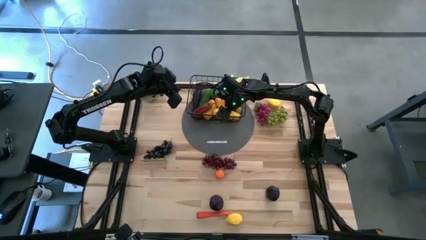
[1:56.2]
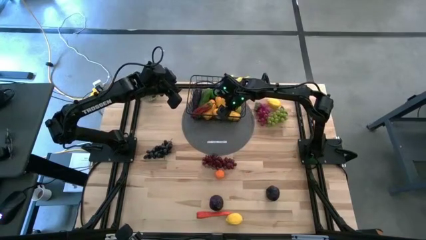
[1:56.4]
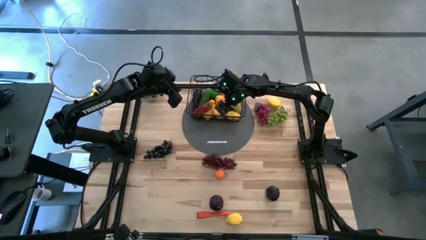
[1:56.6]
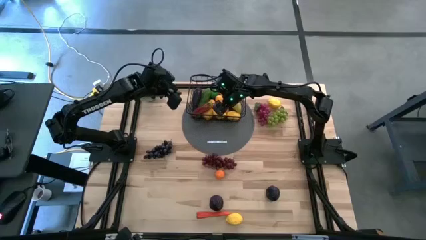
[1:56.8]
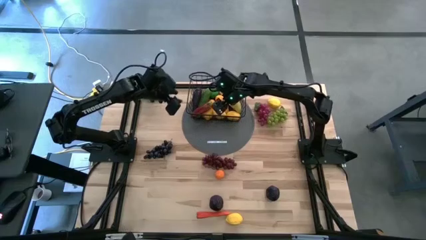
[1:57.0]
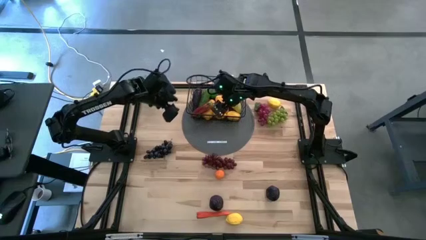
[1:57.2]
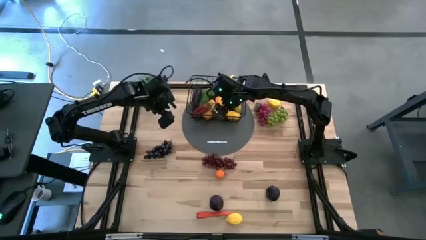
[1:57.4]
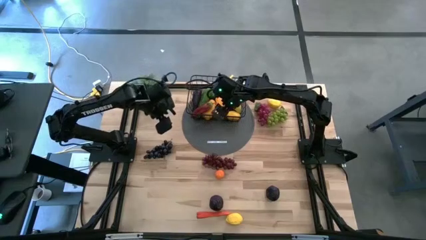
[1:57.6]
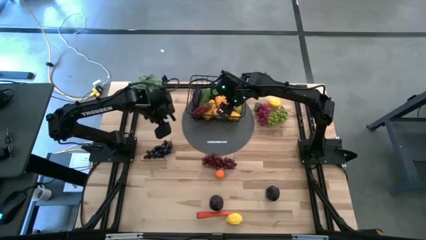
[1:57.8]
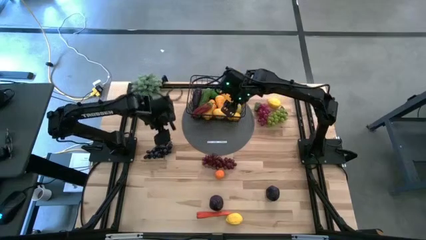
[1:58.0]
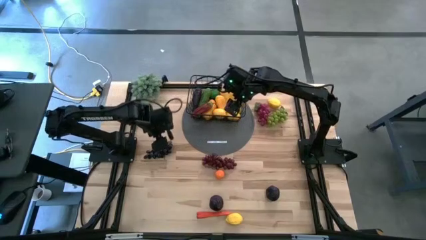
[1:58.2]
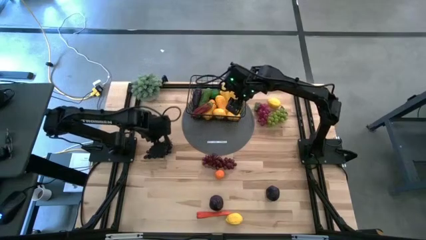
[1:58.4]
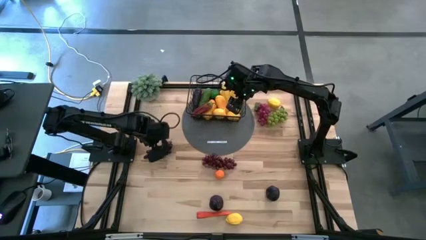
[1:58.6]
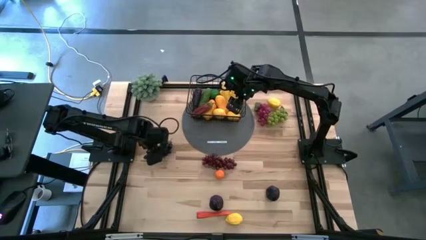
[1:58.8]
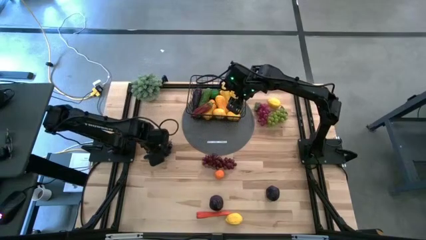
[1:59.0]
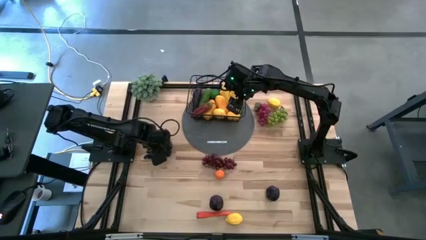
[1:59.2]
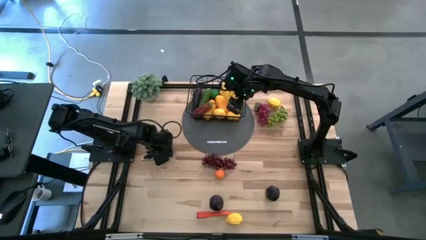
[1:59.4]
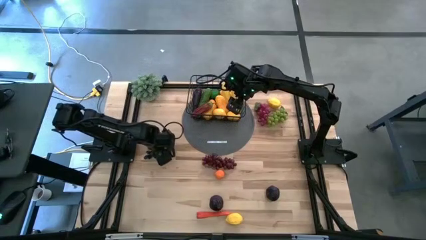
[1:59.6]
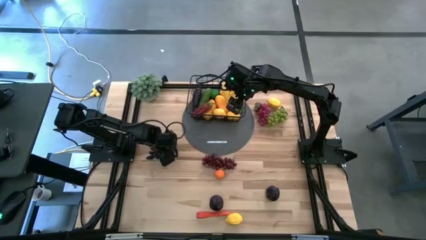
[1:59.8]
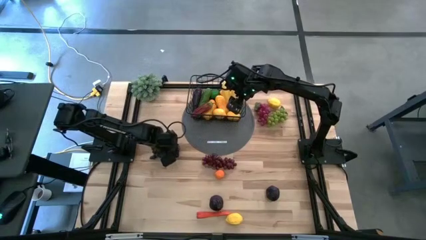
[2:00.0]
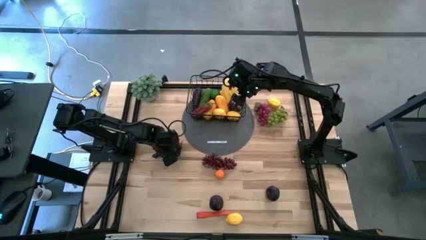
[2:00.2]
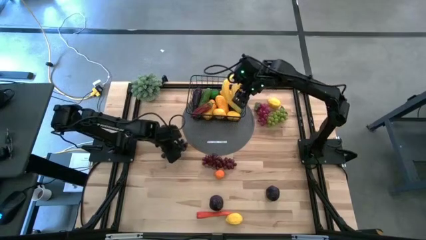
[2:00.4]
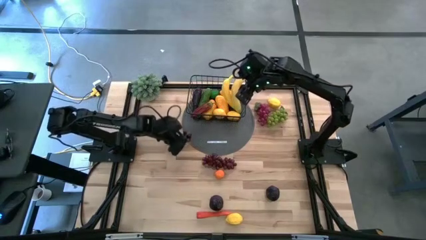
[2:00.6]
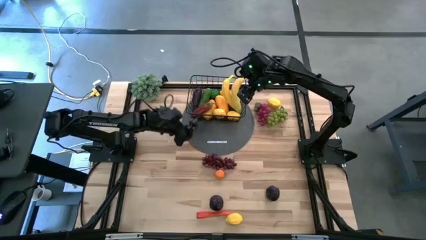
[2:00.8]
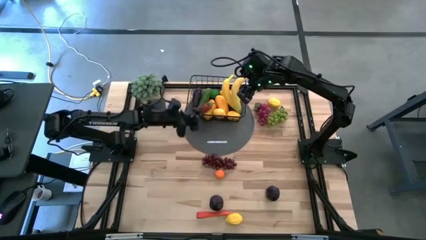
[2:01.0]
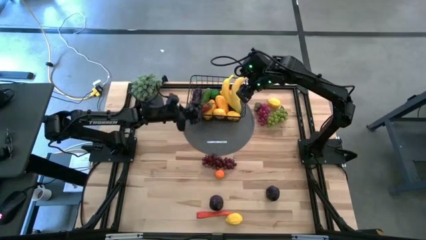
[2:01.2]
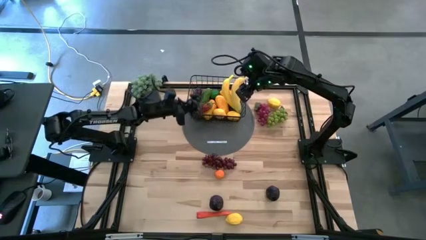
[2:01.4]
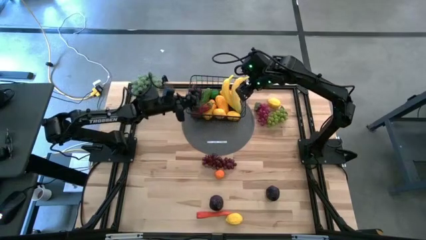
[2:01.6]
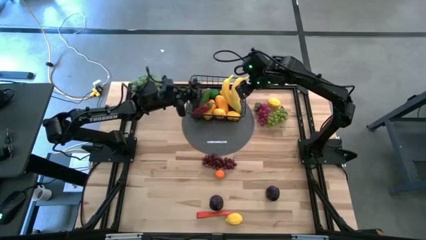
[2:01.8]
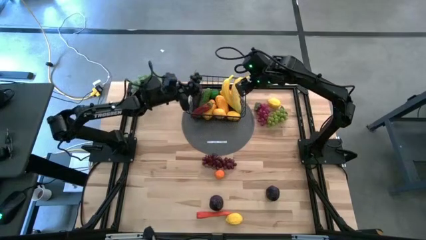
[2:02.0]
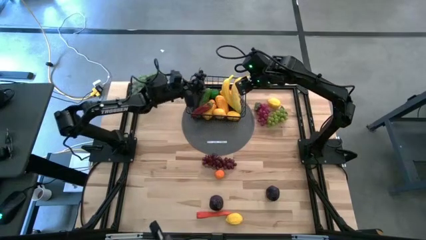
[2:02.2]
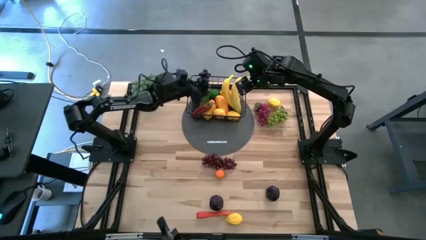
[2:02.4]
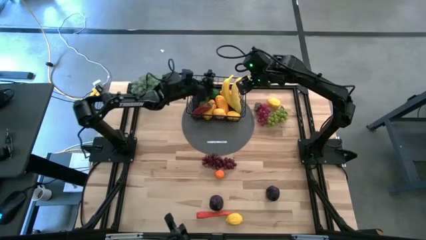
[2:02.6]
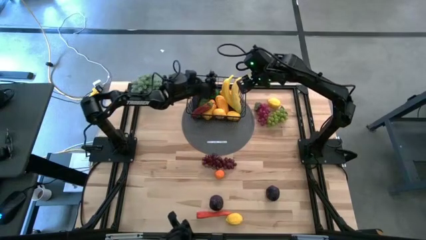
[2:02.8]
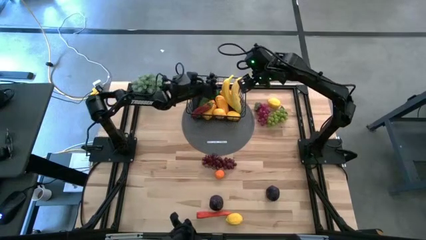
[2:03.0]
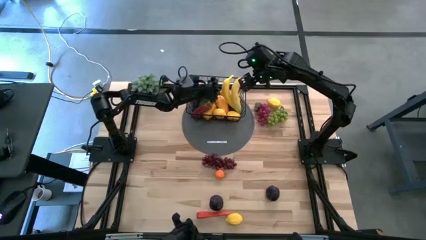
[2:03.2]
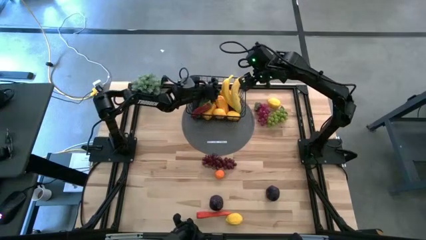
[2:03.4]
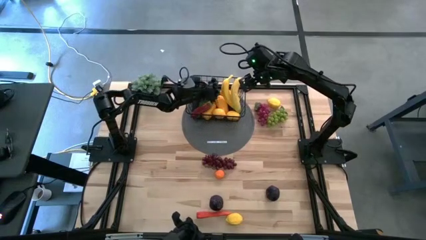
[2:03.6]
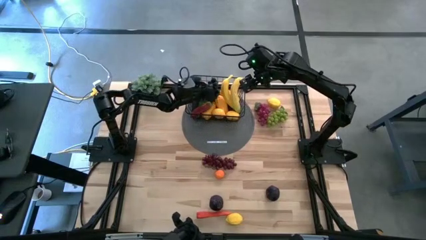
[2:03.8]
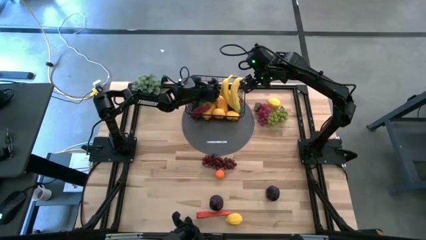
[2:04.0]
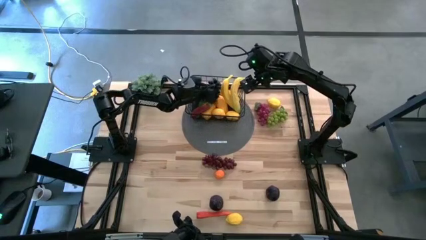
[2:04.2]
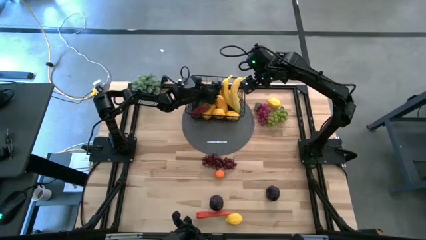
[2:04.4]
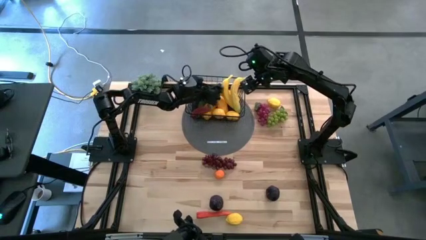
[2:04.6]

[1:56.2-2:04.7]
Task: Build produce basket
Put the bottom left purple grapes into the black wire basket

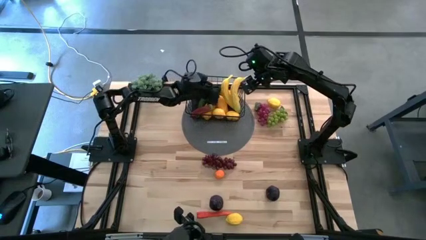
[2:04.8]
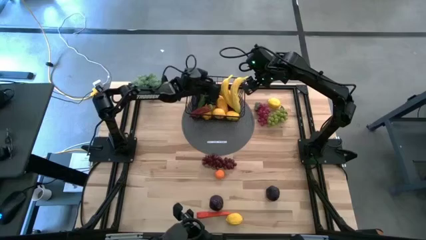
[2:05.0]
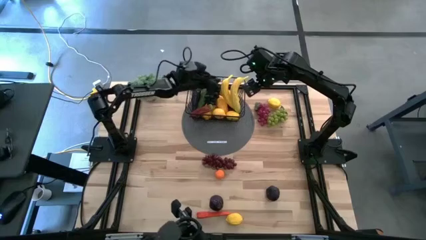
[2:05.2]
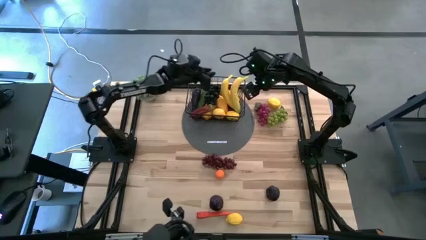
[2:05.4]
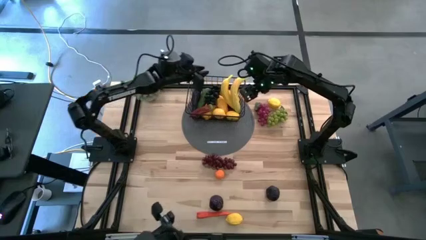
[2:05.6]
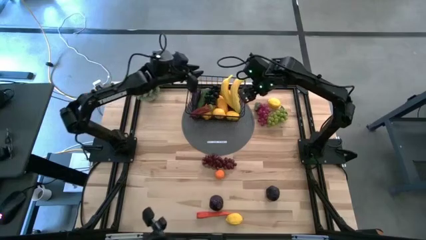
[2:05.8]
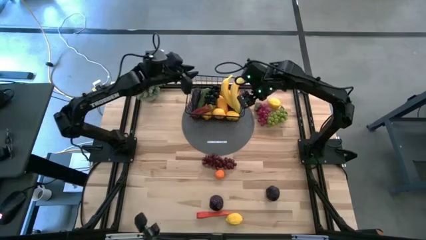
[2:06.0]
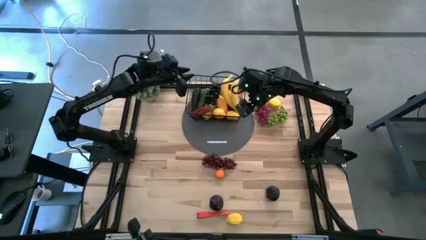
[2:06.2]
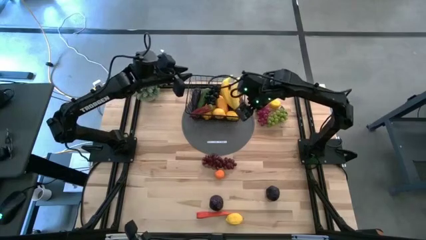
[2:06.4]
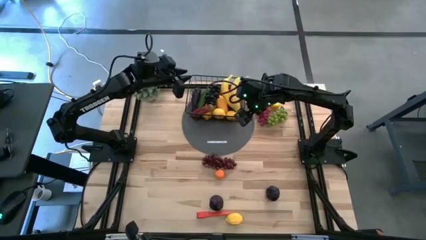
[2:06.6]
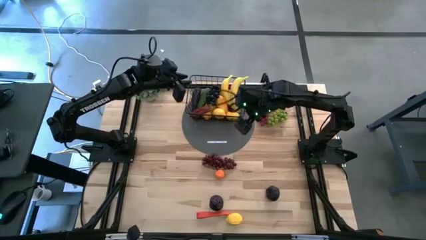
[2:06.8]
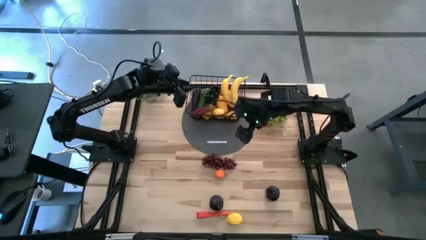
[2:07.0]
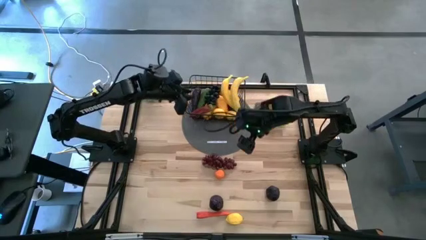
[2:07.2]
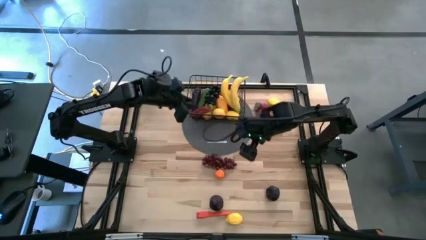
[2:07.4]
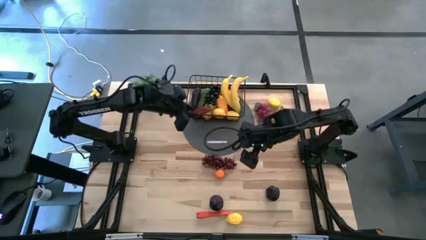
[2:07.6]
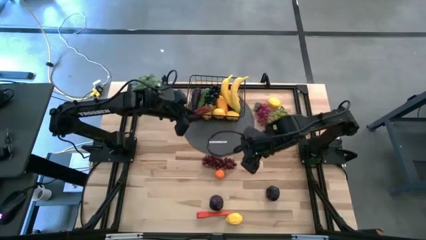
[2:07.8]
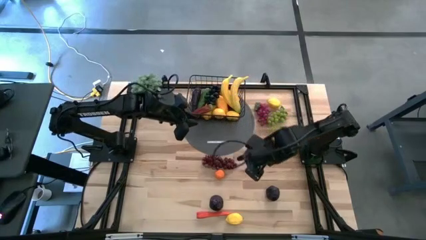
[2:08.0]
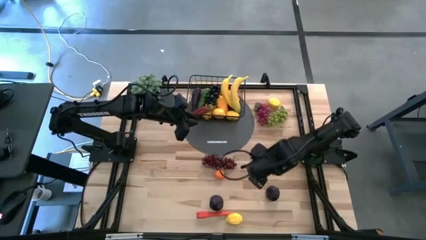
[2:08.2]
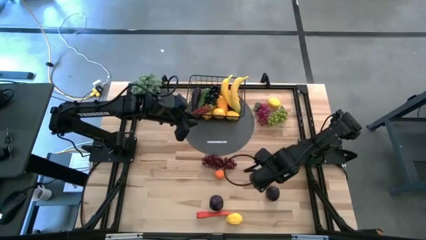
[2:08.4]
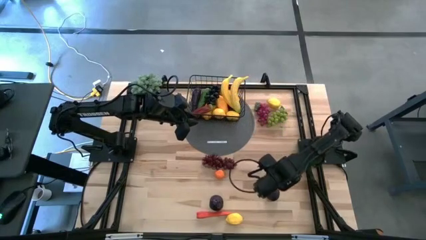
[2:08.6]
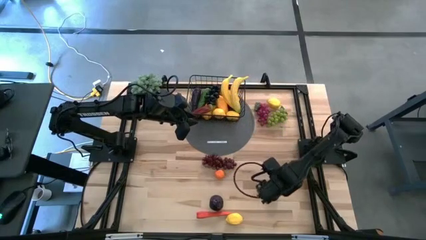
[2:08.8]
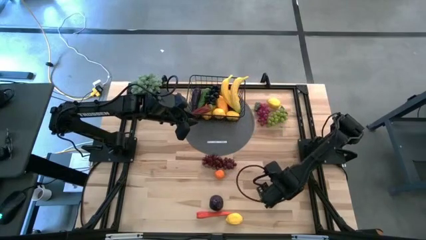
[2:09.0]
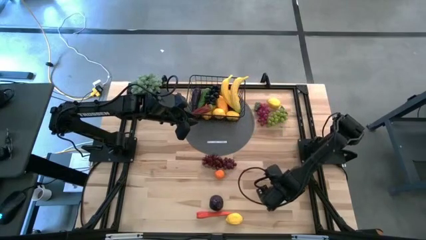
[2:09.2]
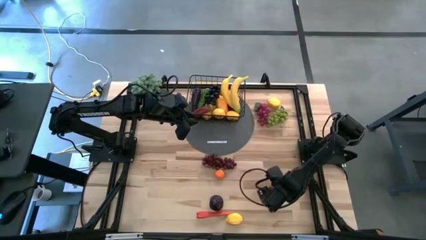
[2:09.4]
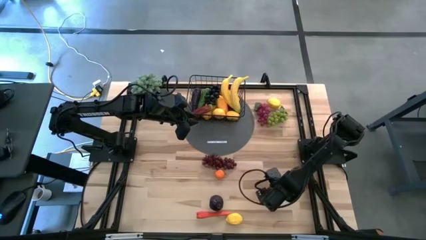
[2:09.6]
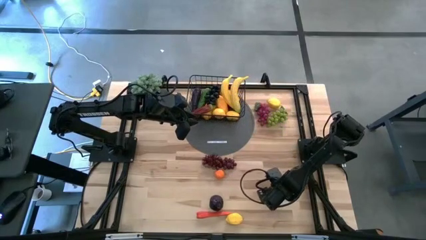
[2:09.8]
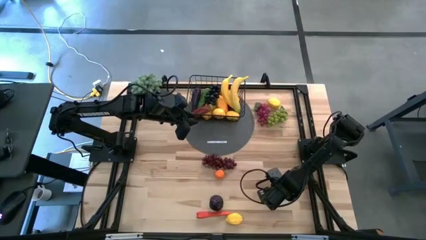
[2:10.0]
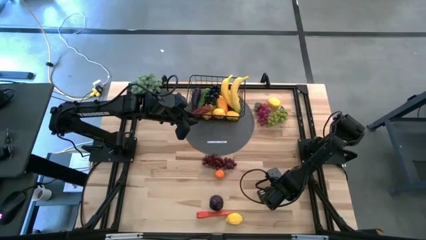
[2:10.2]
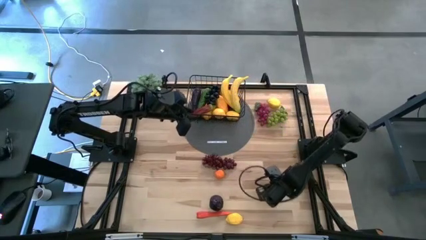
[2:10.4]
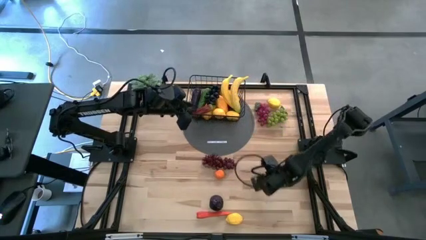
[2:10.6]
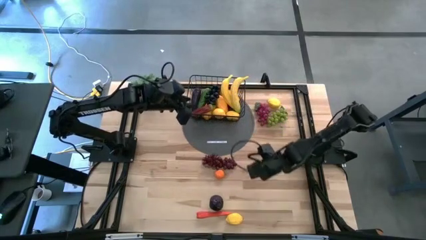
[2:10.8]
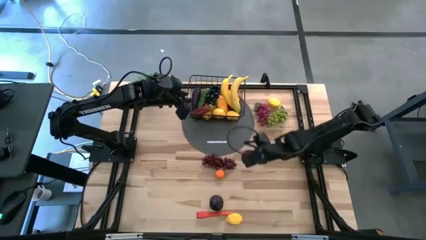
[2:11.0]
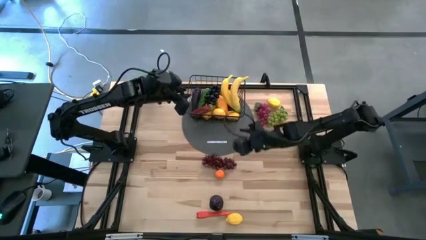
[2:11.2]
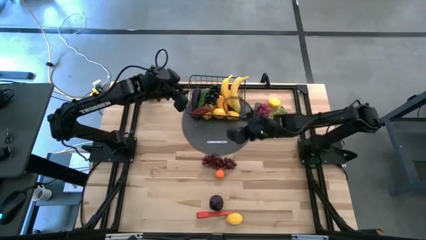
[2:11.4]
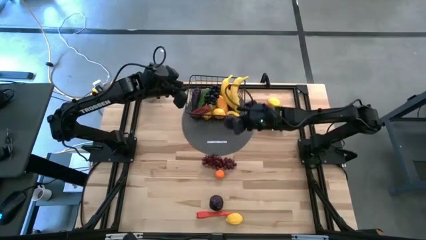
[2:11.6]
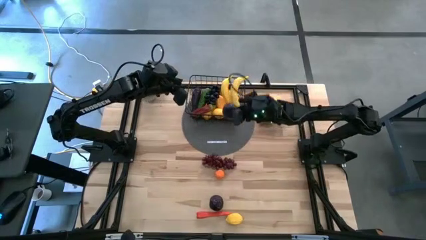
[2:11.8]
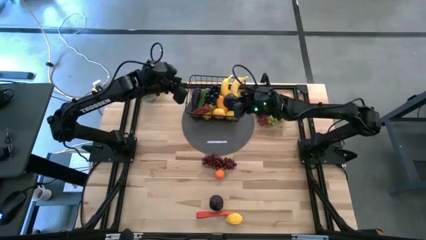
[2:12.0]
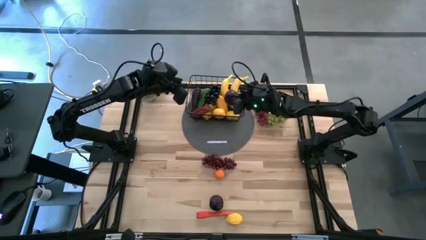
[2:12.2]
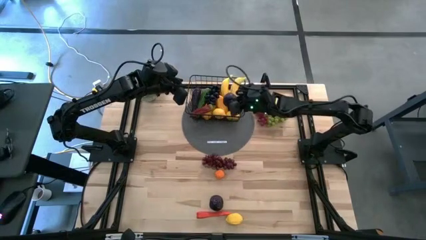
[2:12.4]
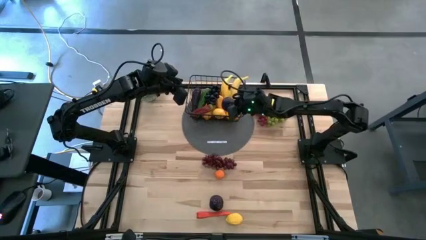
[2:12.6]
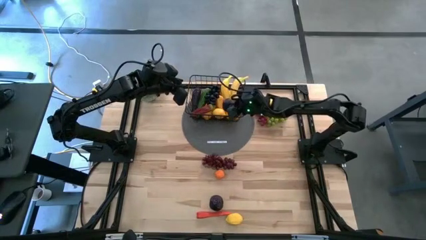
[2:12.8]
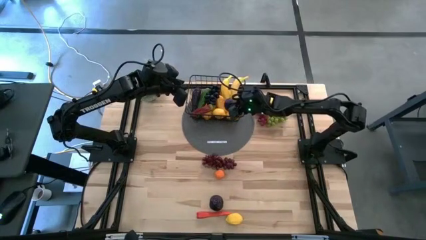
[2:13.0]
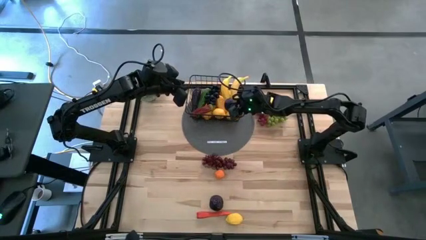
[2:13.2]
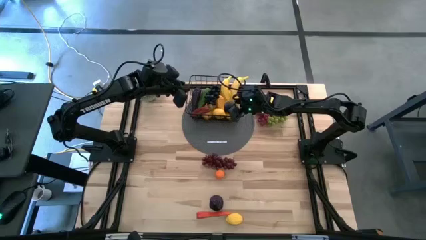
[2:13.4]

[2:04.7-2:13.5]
Put the right purple plum into the black wire basket
